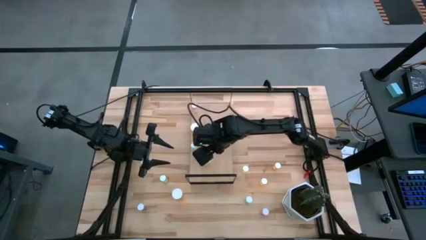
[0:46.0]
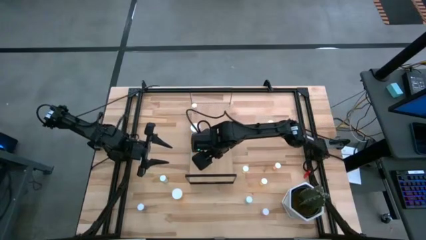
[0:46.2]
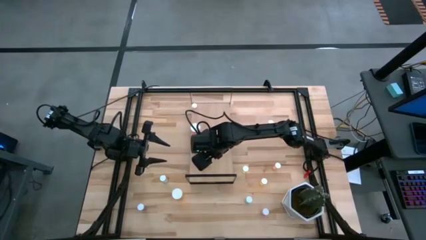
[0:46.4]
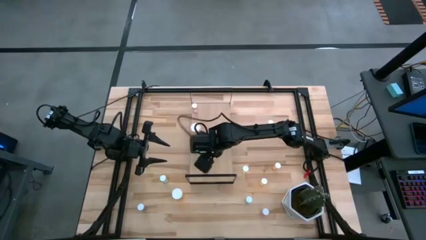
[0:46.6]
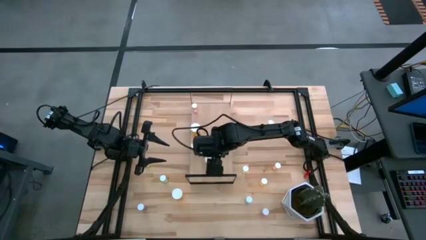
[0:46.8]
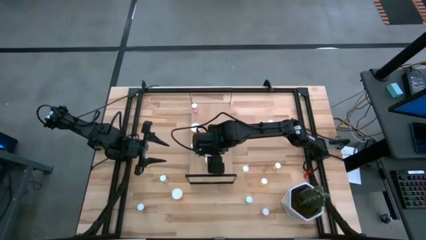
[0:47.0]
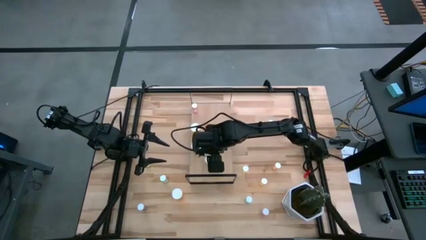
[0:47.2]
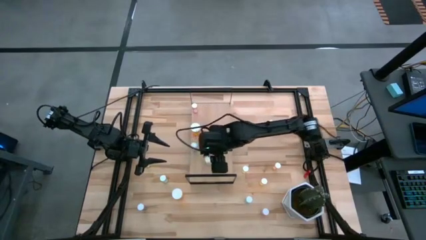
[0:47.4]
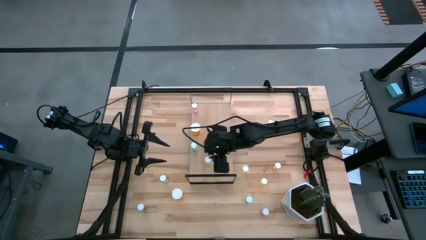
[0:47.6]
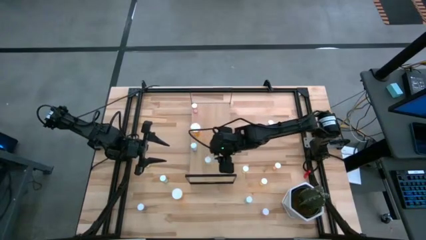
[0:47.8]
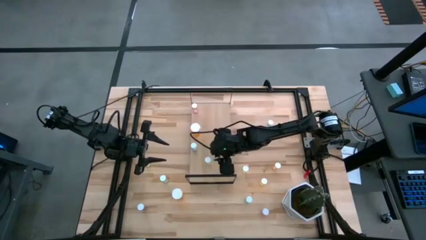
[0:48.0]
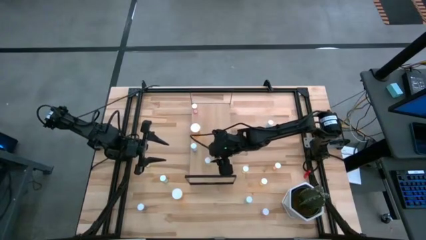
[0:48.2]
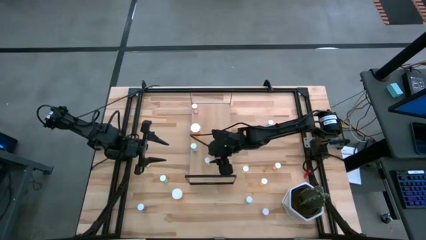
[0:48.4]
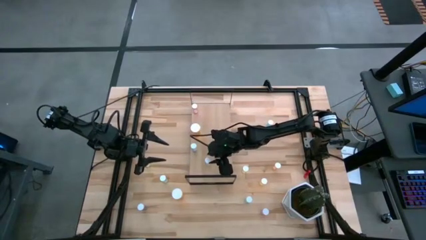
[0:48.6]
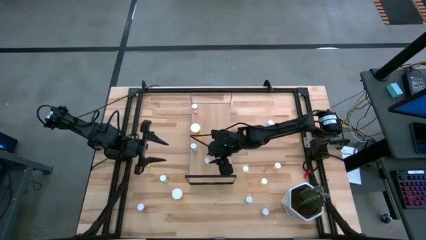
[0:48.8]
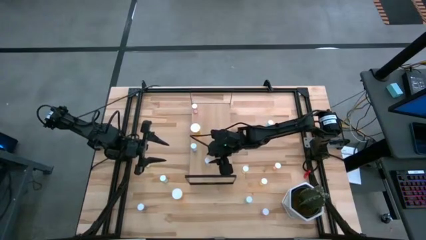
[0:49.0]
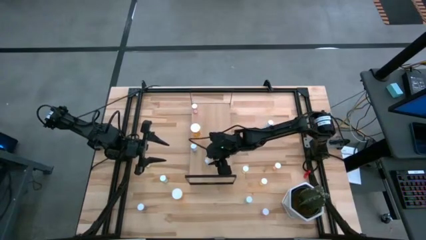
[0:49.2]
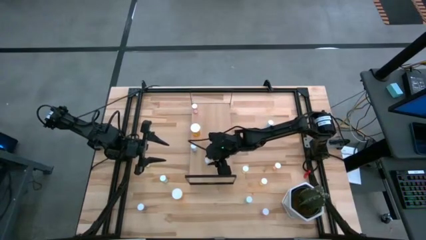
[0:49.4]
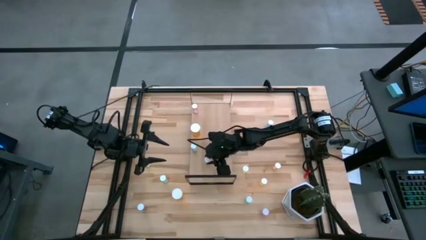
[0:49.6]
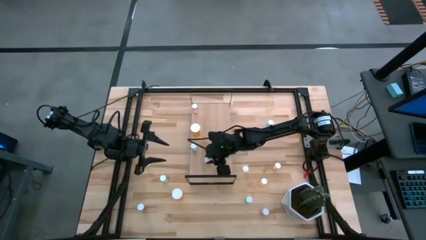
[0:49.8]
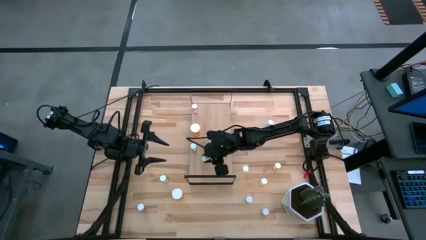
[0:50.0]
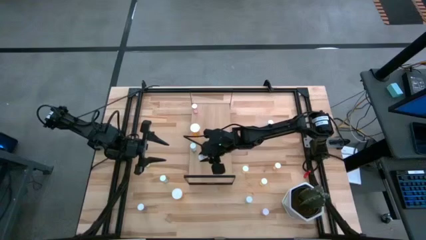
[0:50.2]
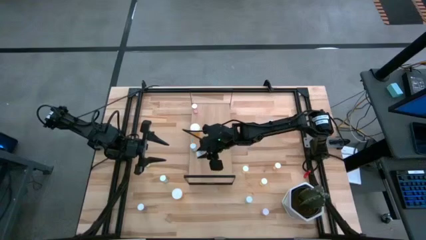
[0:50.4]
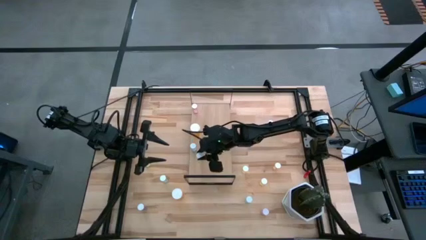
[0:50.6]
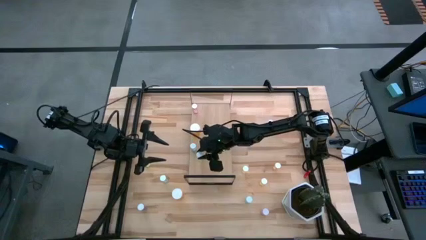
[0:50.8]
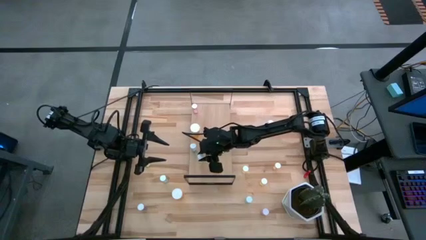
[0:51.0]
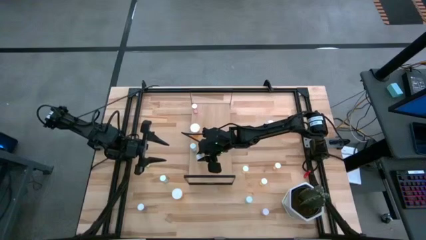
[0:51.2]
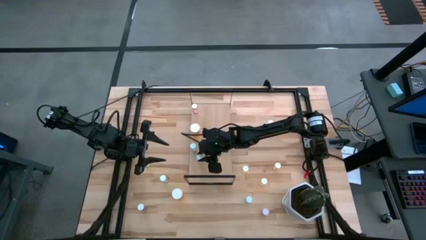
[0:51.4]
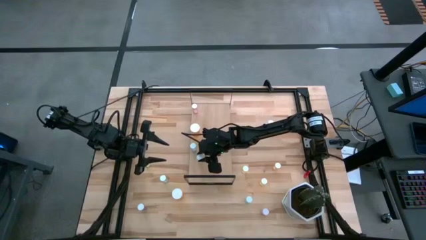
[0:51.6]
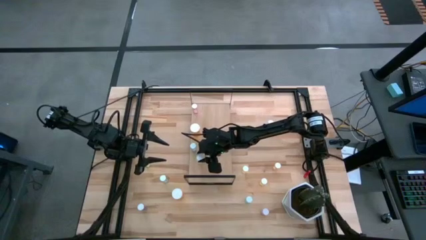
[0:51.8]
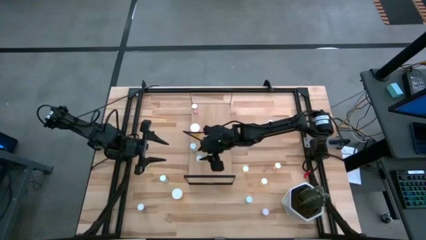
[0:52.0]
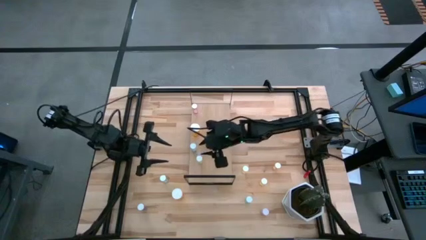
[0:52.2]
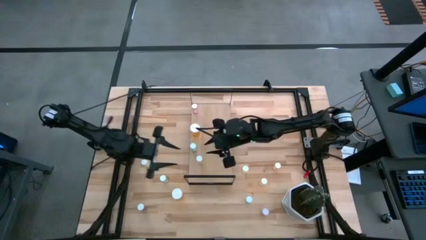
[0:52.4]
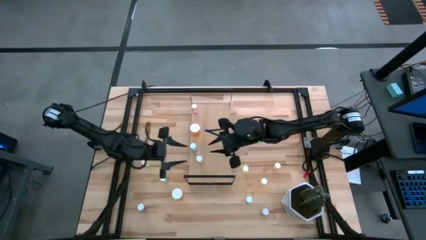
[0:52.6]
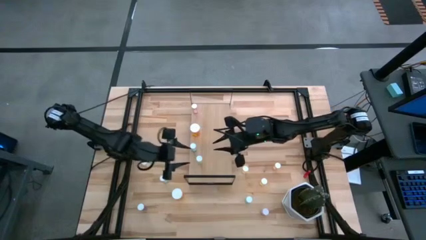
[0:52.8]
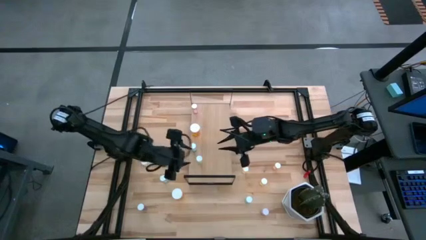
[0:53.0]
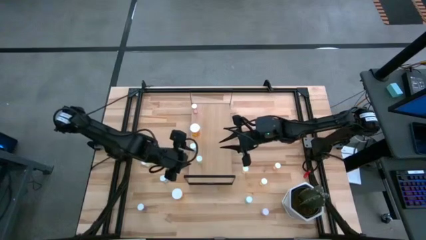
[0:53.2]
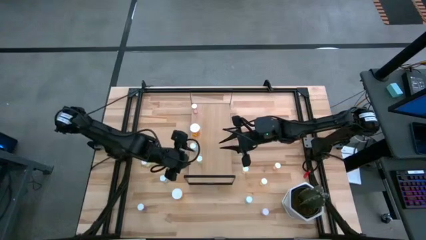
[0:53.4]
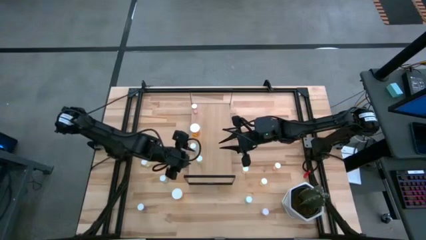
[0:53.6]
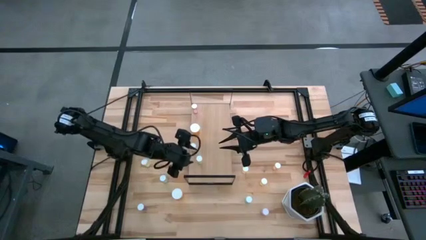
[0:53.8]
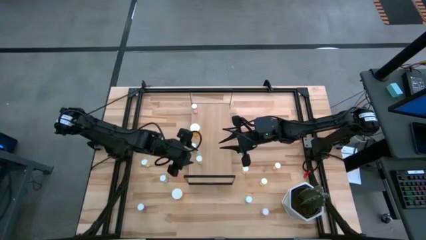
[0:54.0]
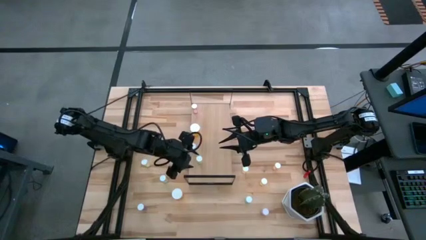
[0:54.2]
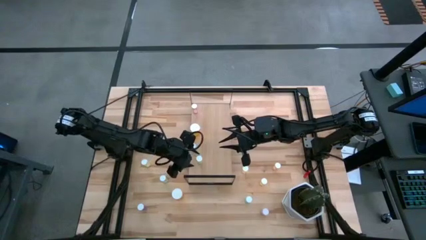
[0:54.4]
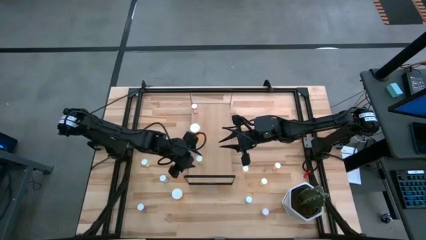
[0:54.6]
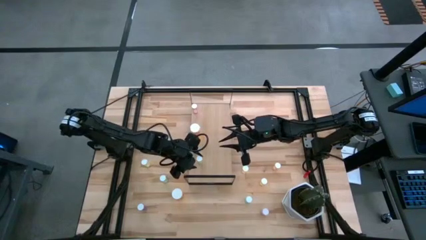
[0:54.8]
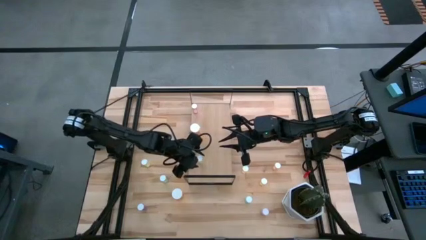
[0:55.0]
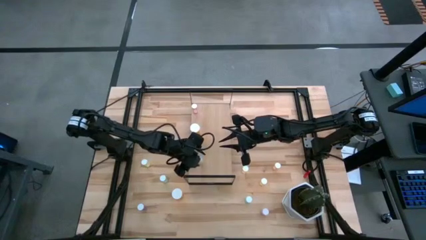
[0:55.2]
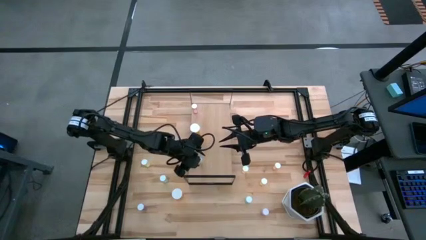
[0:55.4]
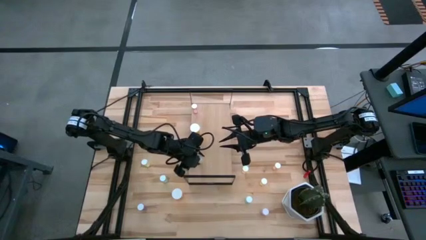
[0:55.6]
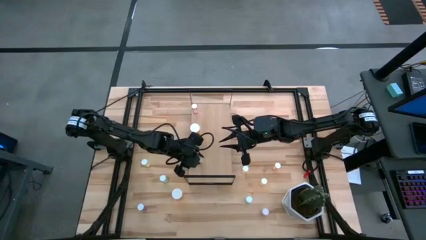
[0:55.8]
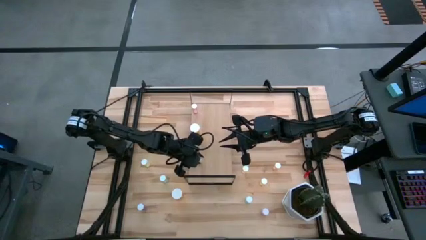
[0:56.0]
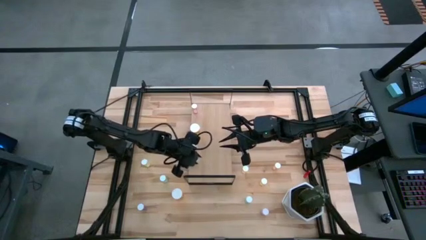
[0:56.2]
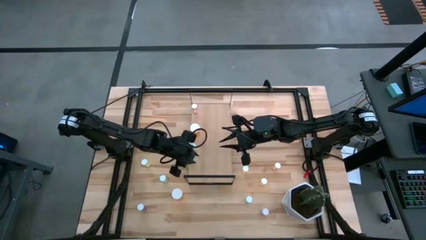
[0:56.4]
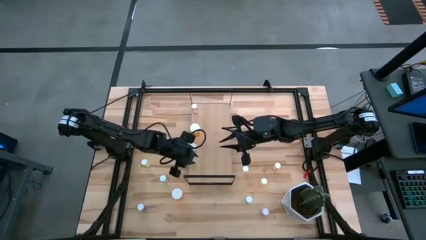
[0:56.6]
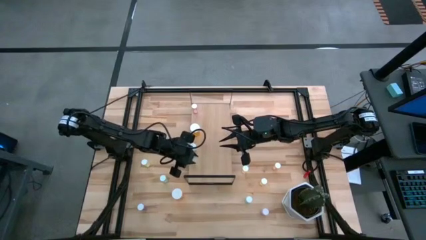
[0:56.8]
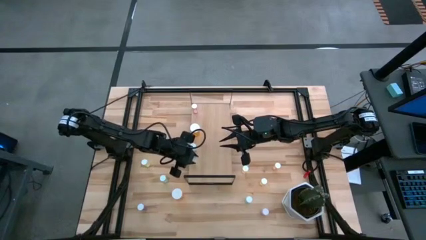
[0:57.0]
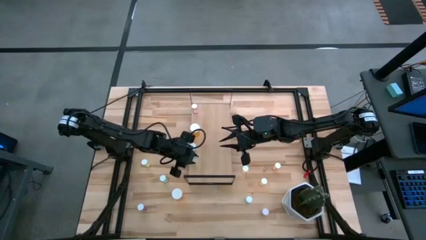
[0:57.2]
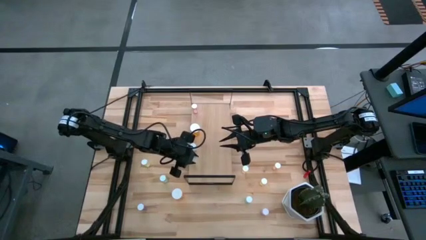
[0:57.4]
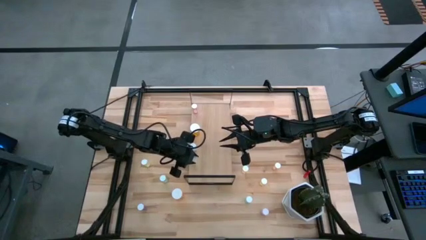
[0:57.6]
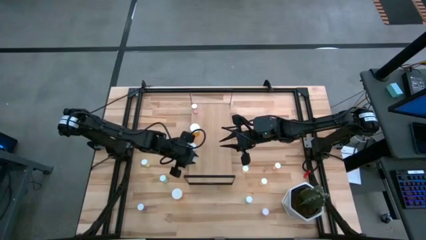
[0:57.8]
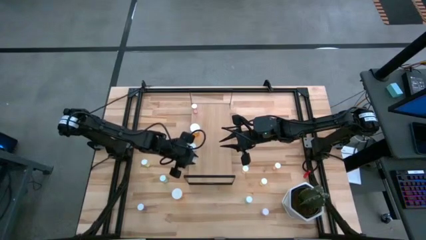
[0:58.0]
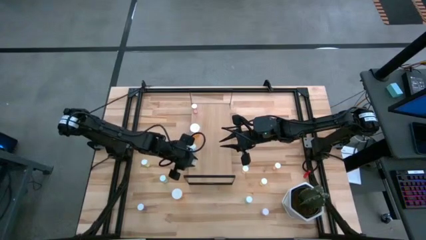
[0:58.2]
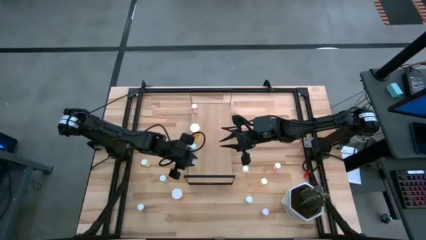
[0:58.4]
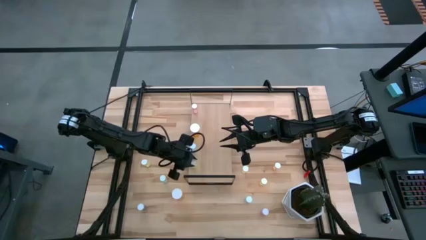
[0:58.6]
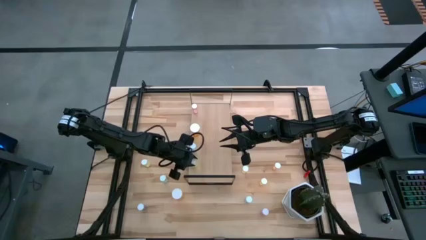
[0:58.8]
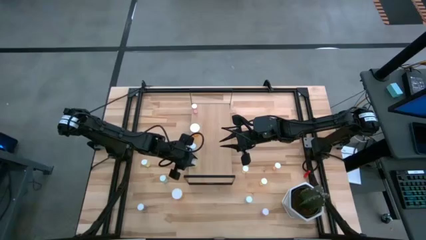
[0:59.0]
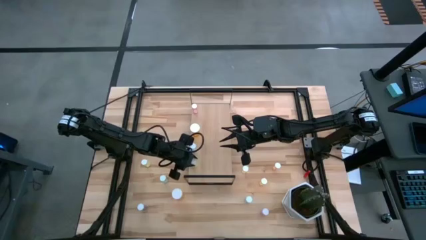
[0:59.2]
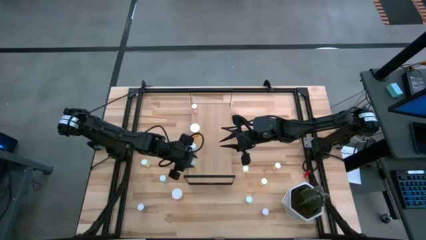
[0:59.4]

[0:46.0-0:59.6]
Task: Pick and place medicine bottles onto shelf by color
Put the yellow pill bottle on the shelf

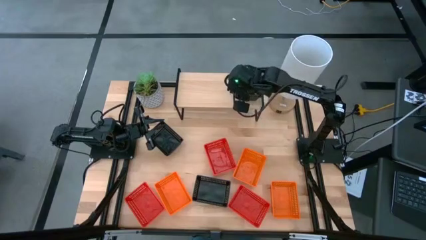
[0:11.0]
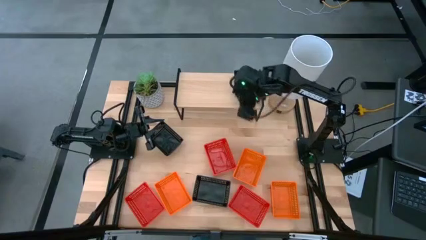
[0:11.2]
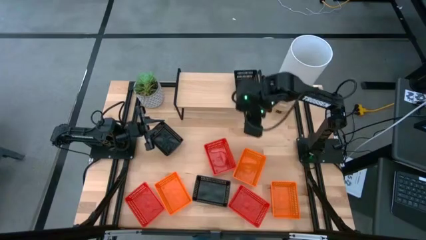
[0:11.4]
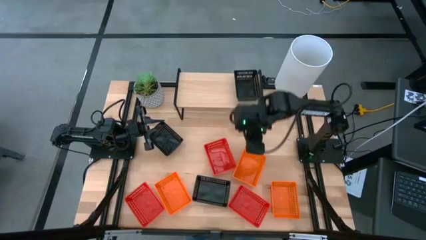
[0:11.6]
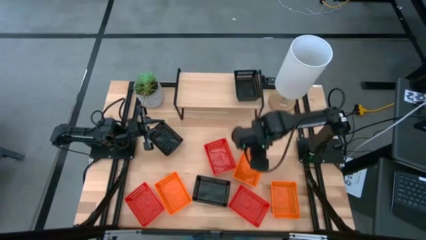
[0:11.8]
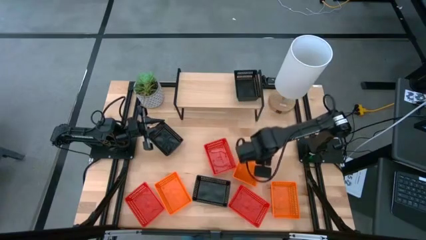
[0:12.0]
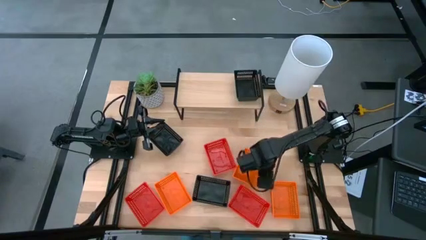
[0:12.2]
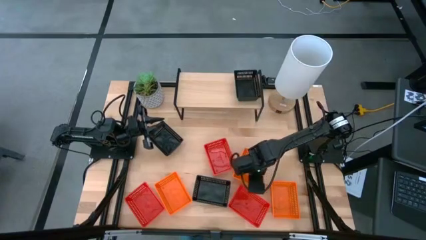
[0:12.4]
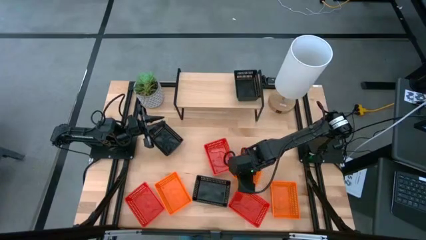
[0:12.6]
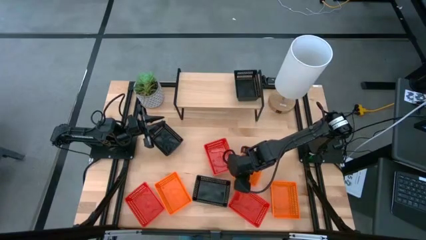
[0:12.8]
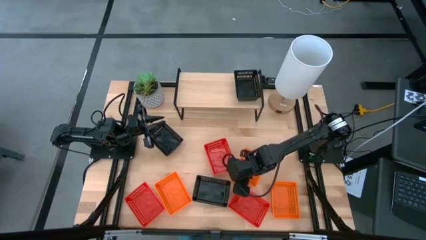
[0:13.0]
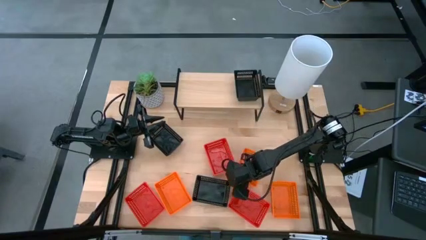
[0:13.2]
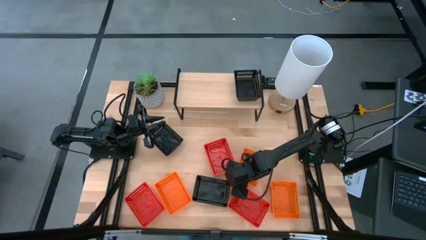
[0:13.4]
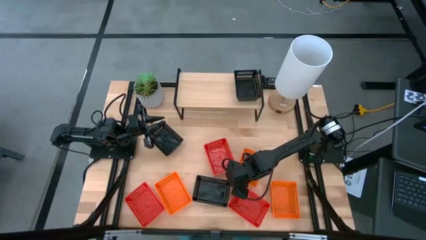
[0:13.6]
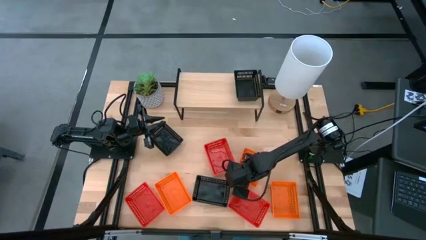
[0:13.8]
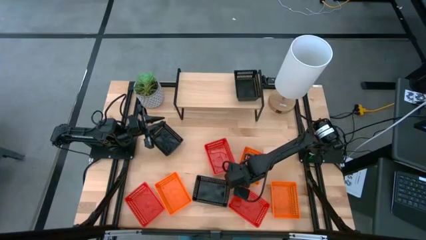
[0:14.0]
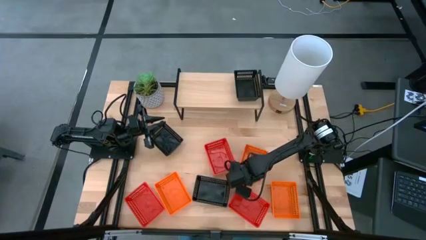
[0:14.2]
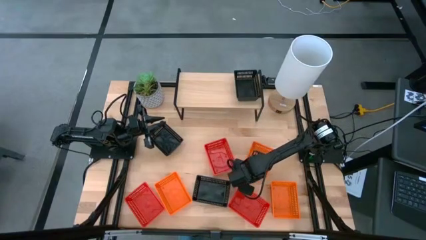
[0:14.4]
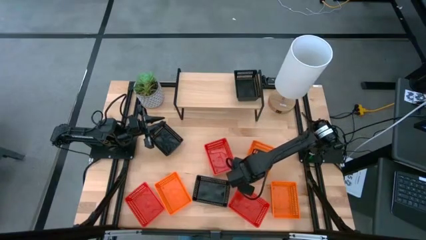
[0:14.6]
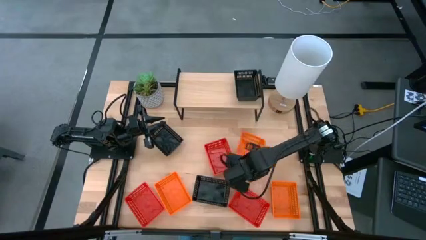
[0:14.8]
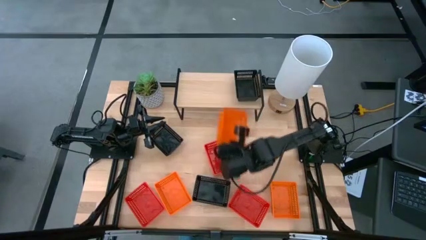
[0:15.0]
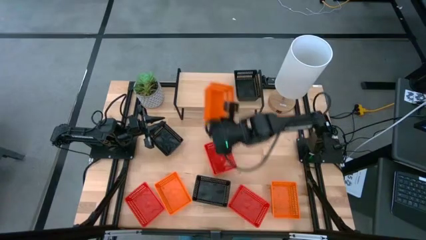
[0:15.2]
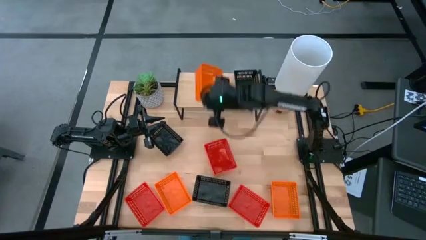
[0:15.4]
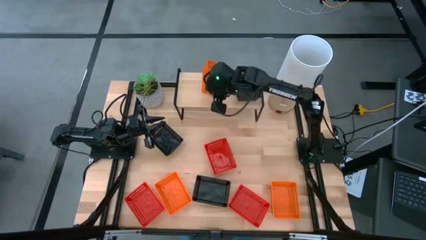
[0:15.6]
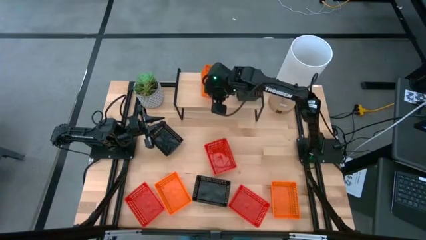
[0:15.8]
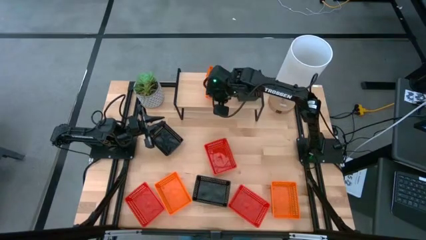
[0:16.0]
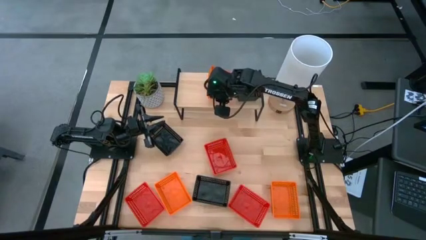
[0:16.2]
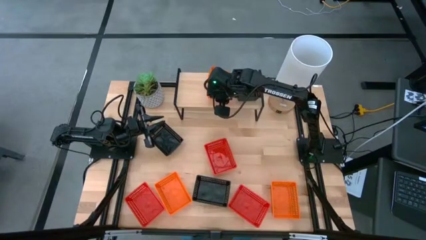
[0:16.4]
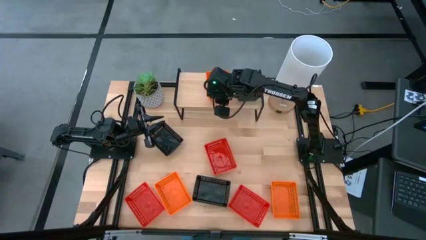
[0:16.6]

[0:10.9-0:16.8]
Task: Stack baskets on shelf by color
Put the middle orange basket on the shelf
